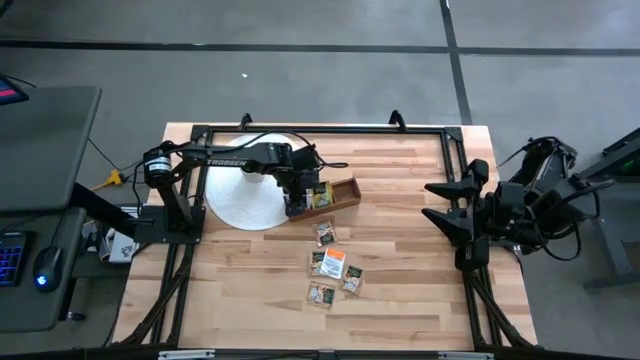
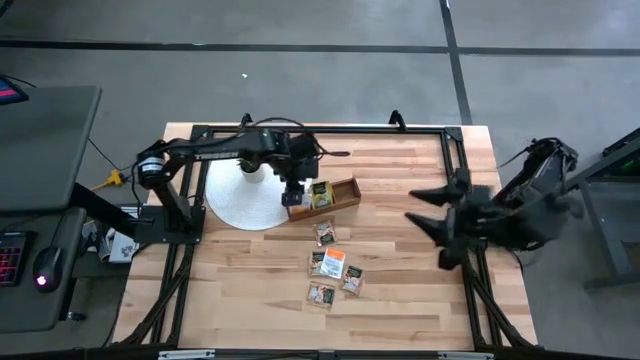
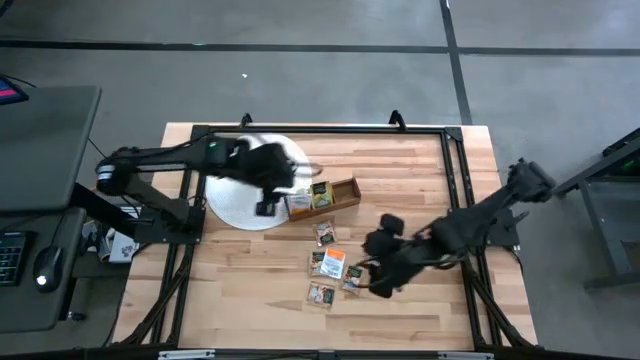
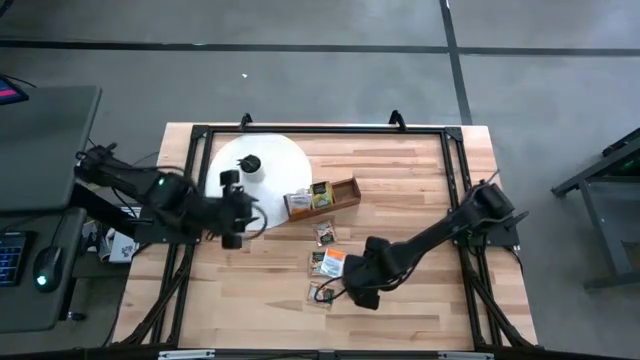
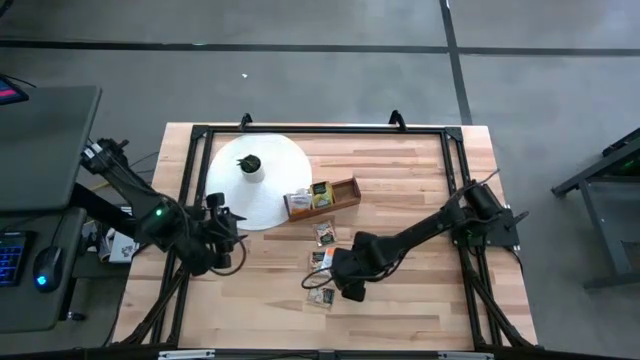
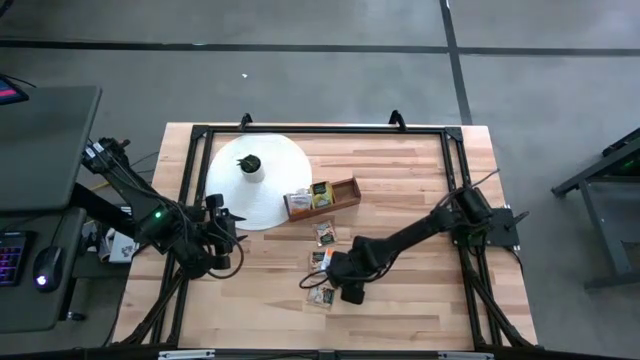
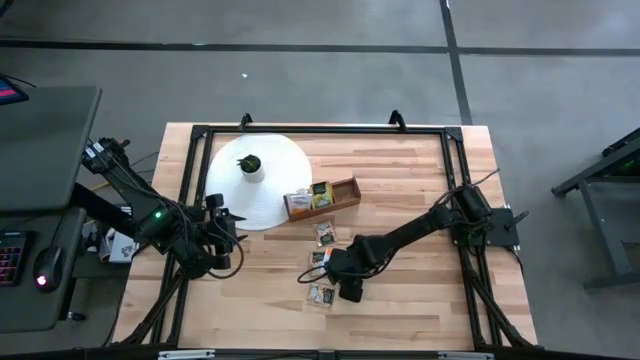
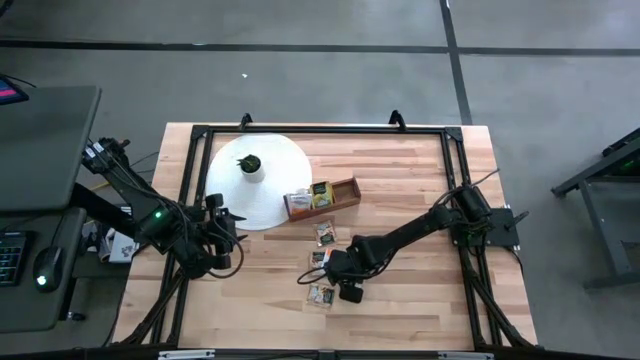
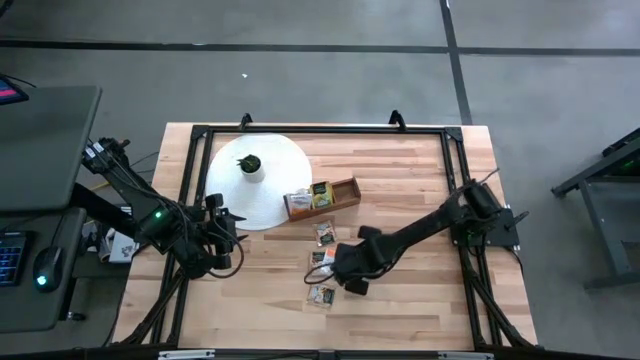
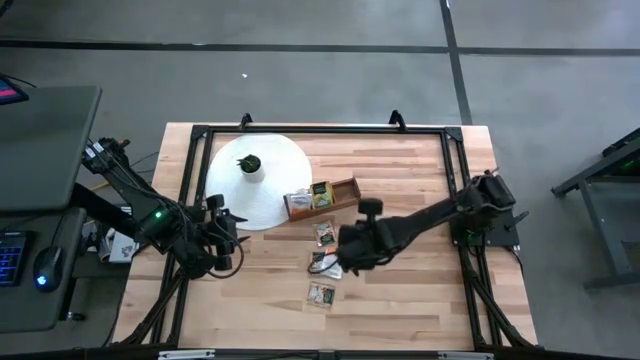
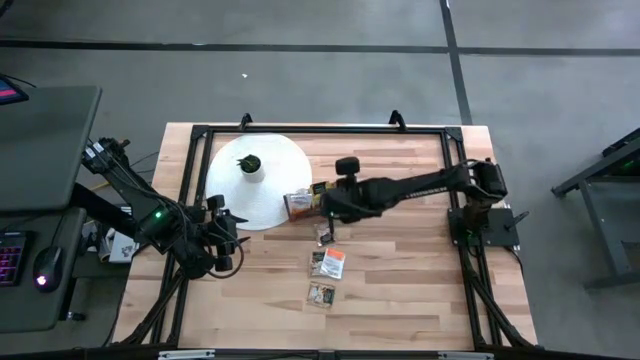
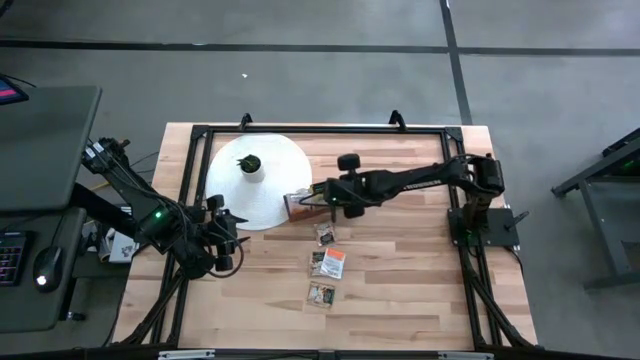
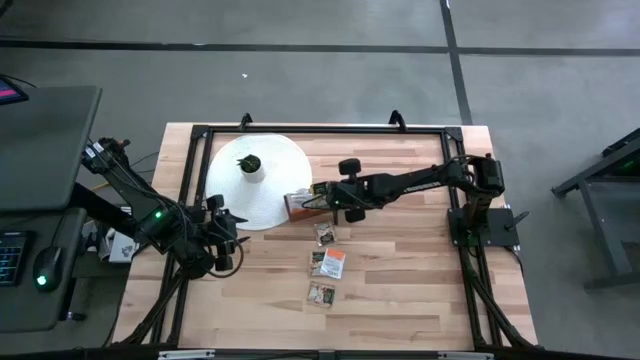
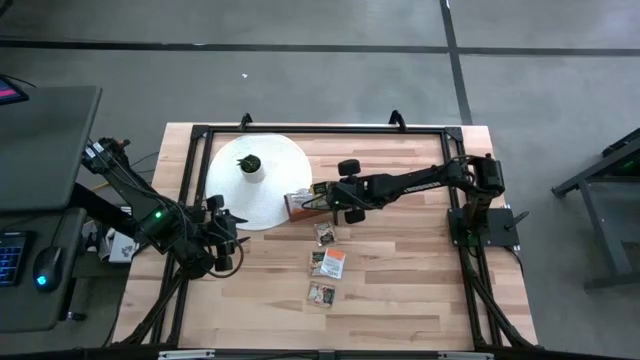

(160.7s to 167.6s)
Task: Pick & Place Tea
Put the brown tea bag into the right section of the wooden organizer

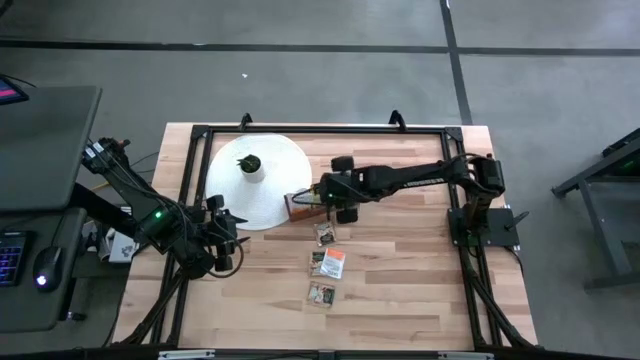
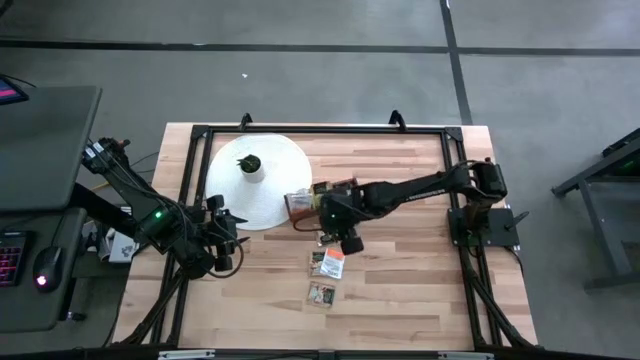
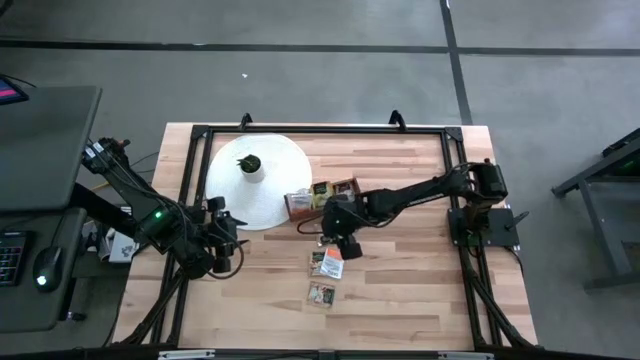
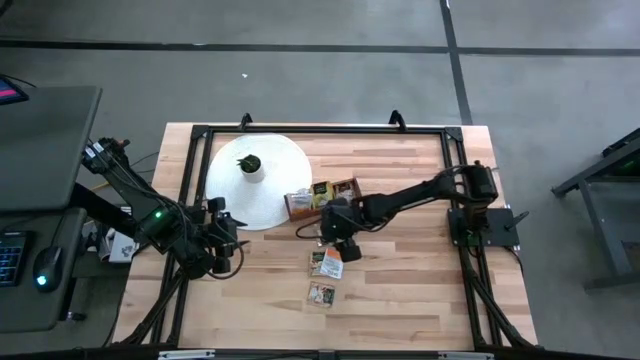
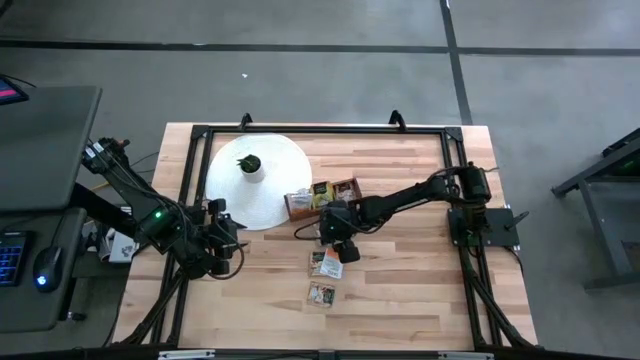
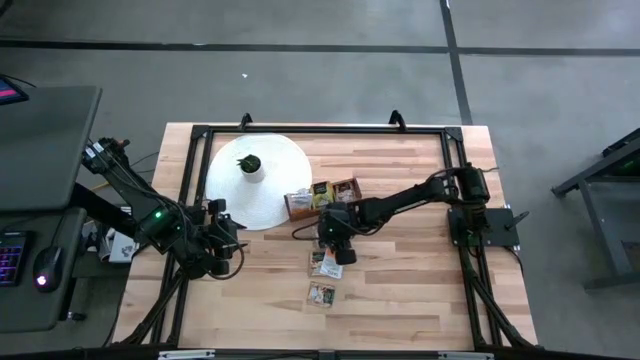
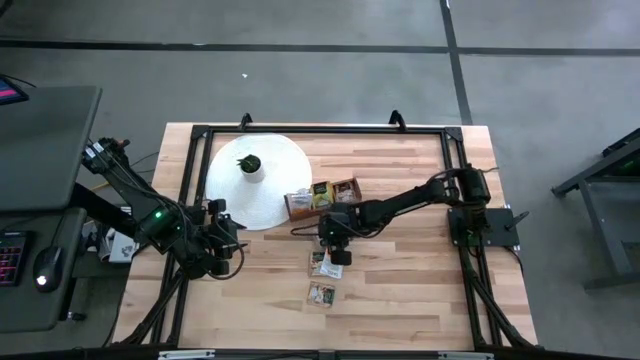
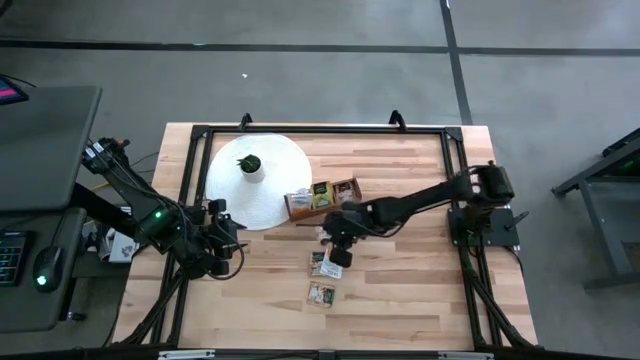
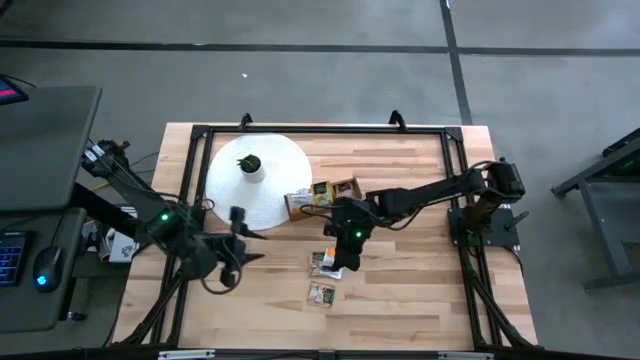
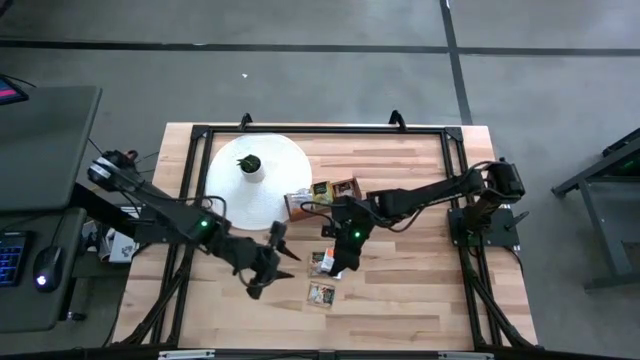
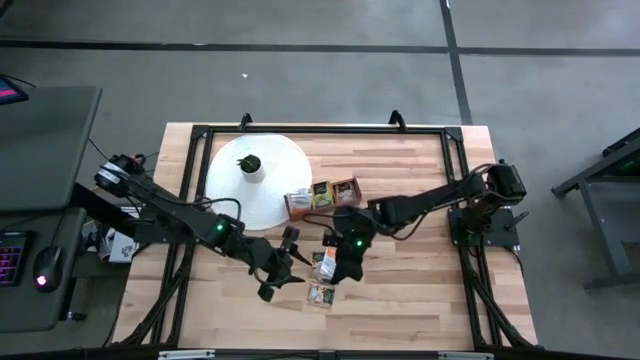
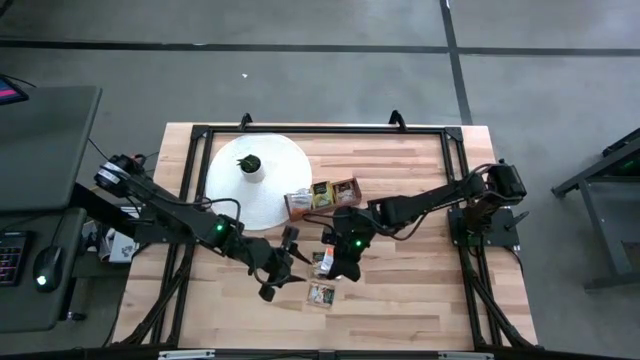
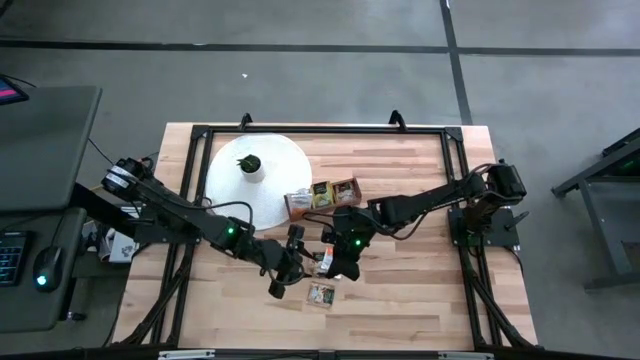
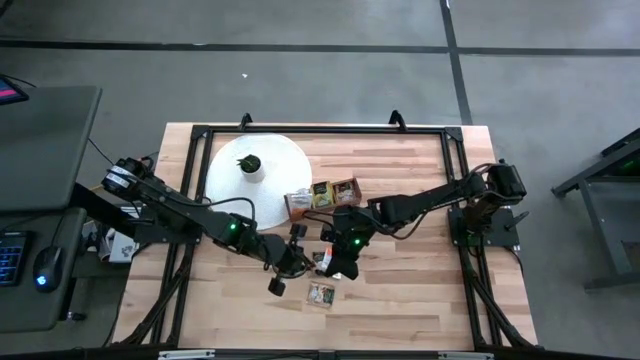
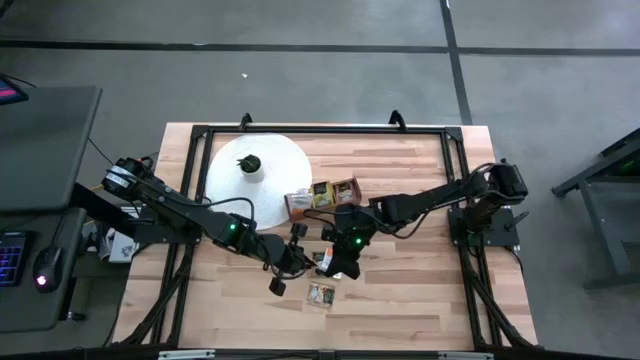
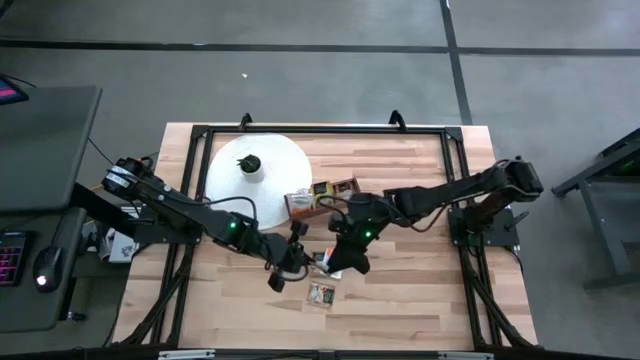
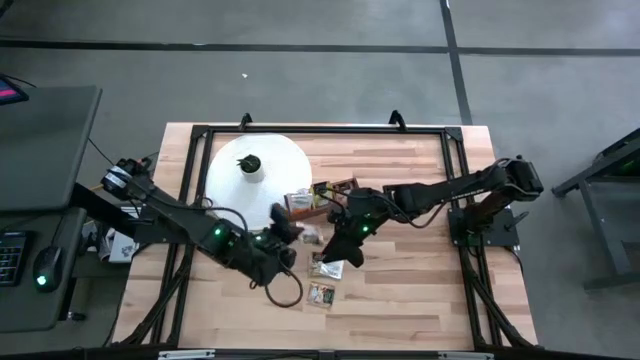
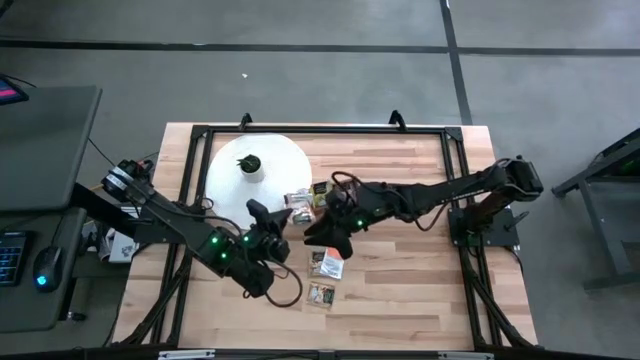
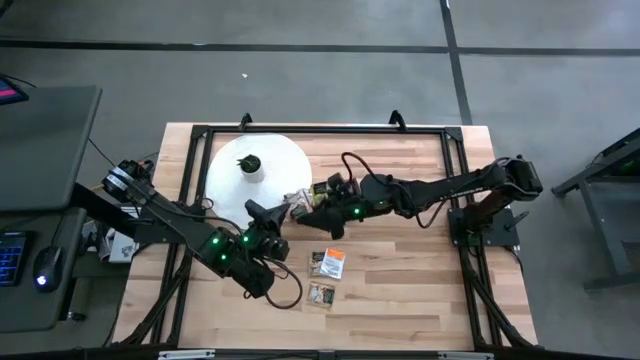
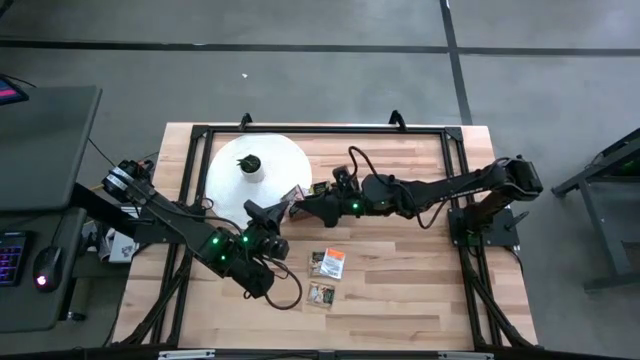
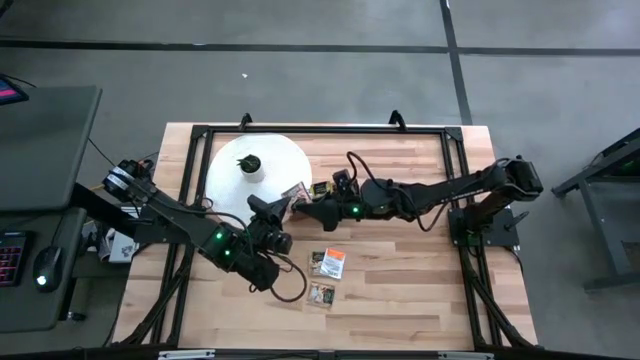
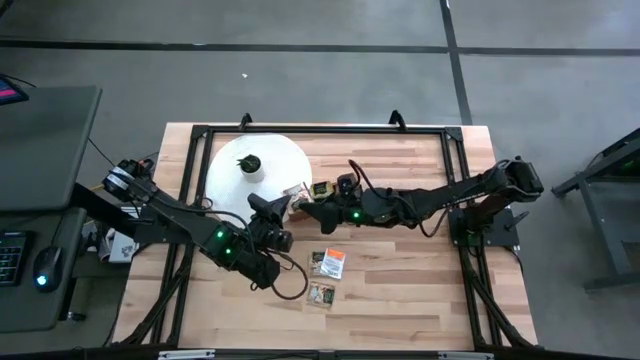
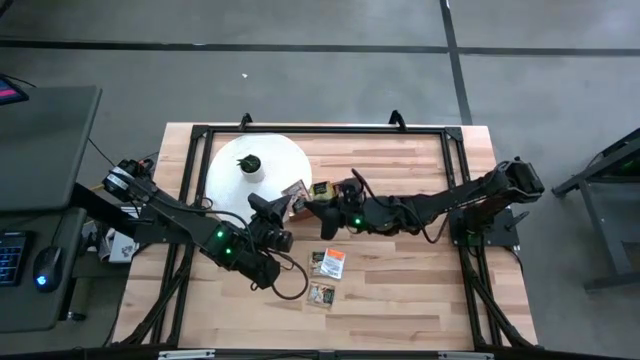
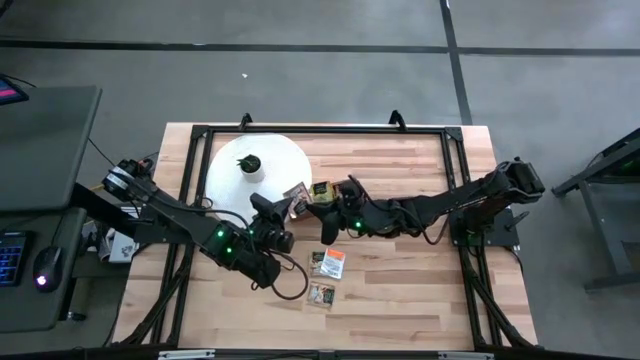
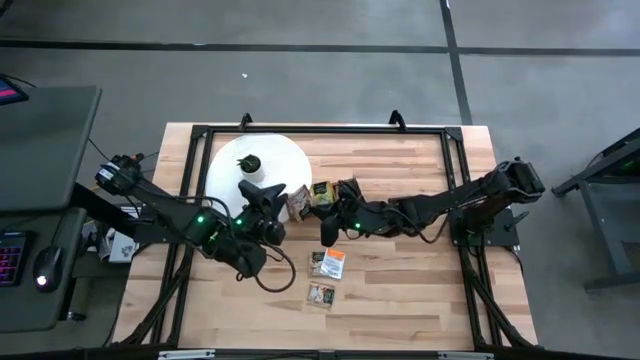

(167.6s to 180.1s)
Put the brown tea bag into the right section of the wooden organizer

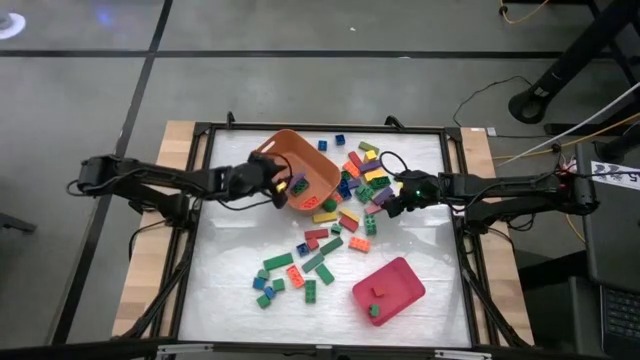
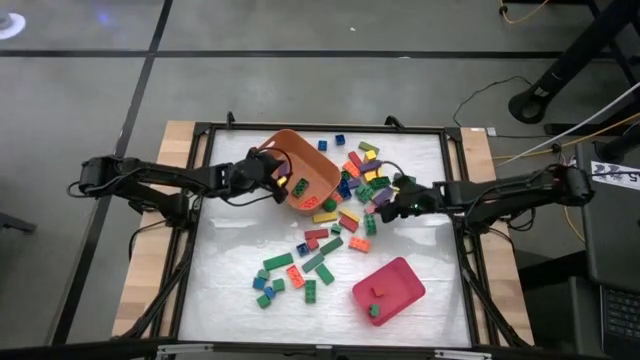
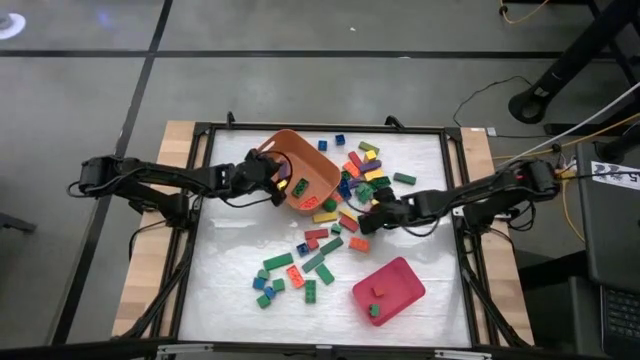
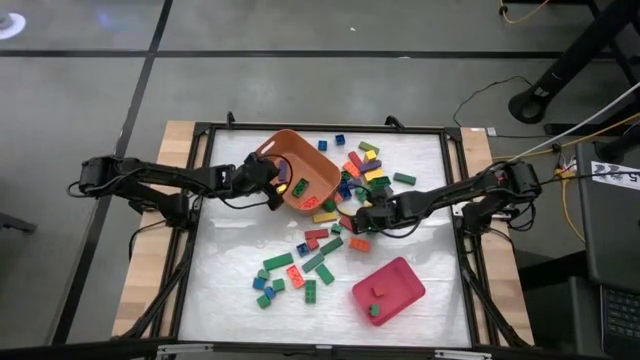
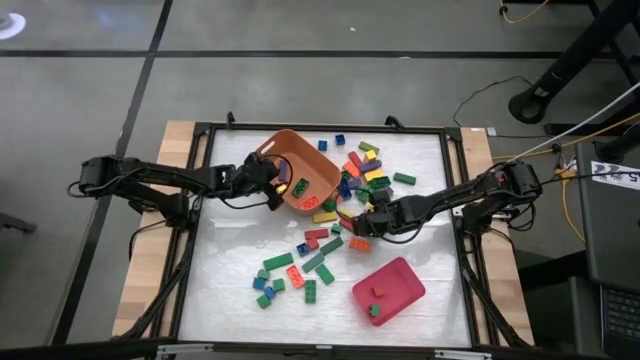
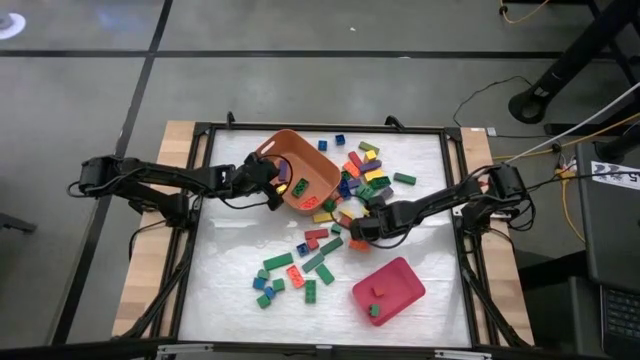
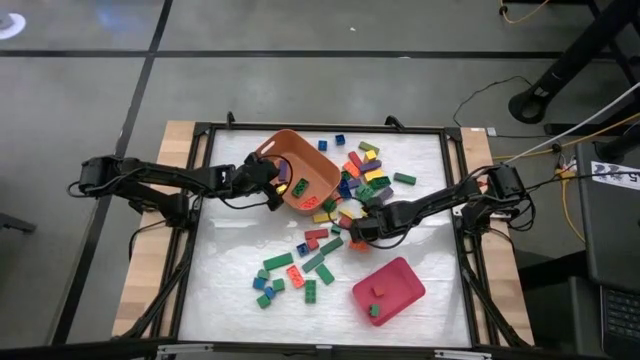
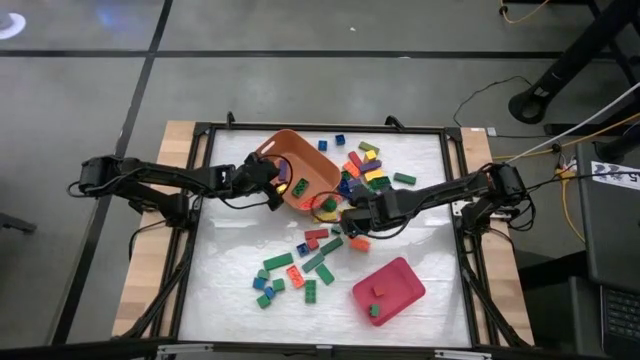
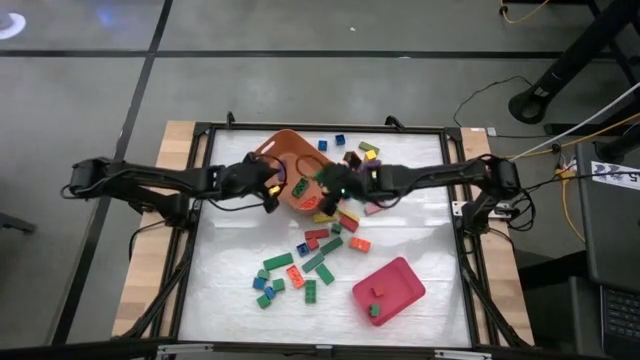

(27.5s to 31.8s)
Task: Sort blocks by size
Put the large green game piece into the orange bin
